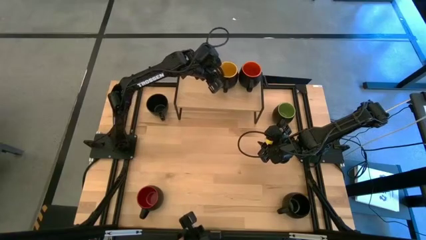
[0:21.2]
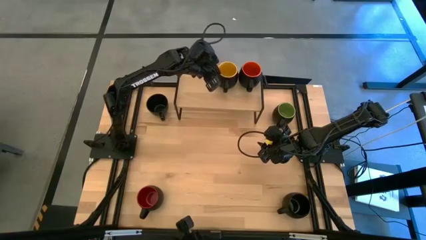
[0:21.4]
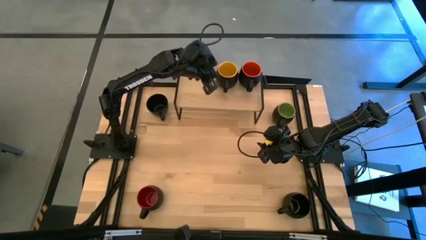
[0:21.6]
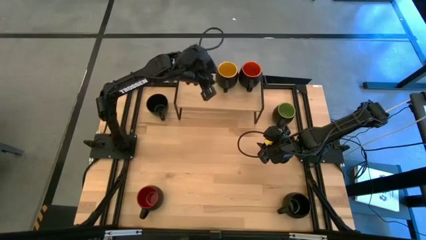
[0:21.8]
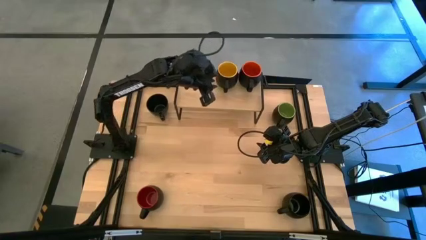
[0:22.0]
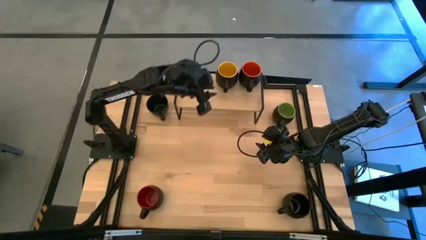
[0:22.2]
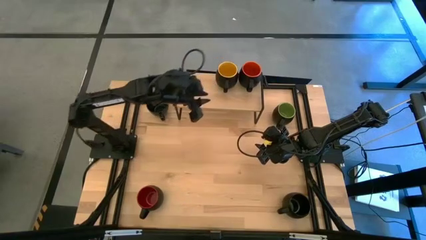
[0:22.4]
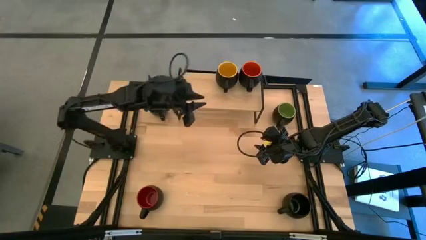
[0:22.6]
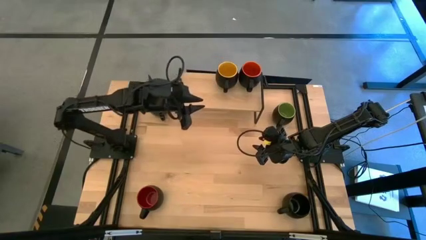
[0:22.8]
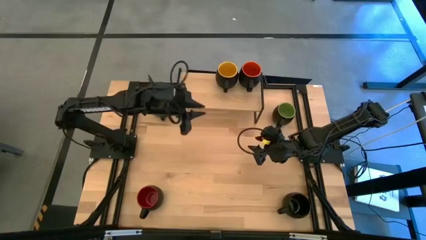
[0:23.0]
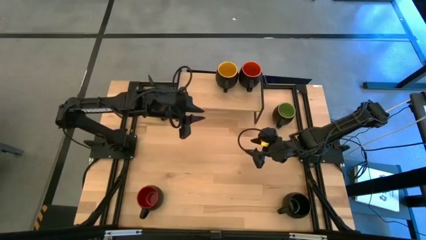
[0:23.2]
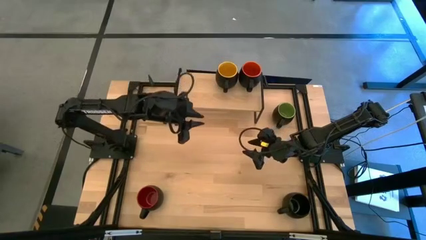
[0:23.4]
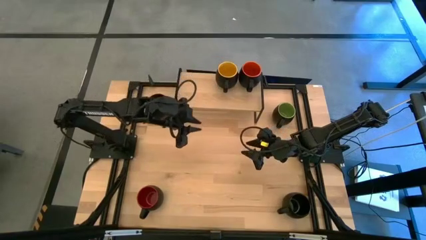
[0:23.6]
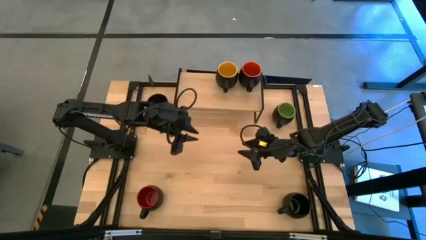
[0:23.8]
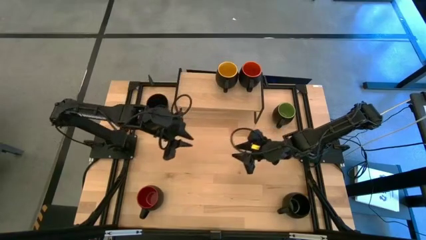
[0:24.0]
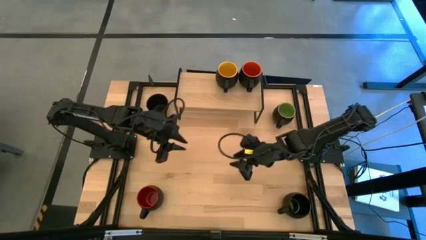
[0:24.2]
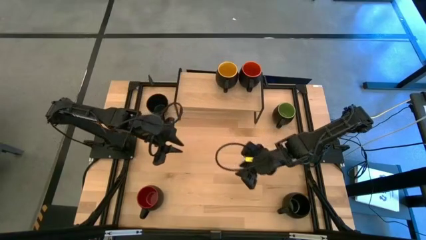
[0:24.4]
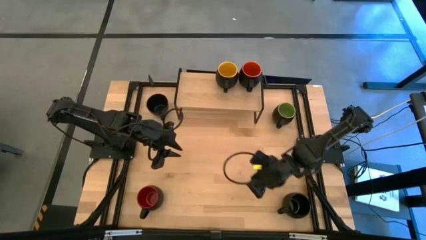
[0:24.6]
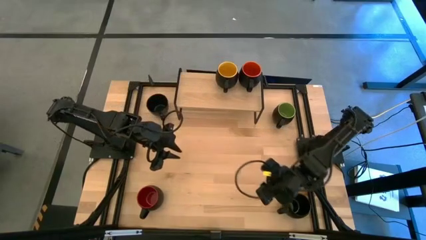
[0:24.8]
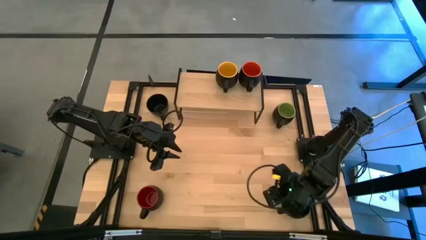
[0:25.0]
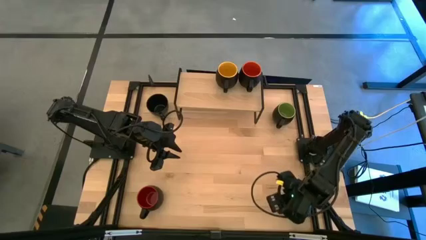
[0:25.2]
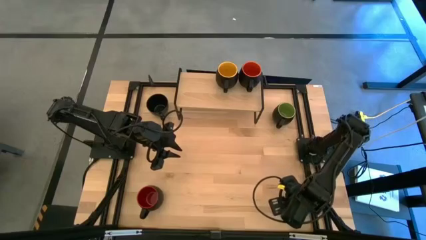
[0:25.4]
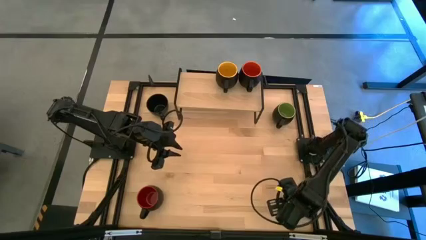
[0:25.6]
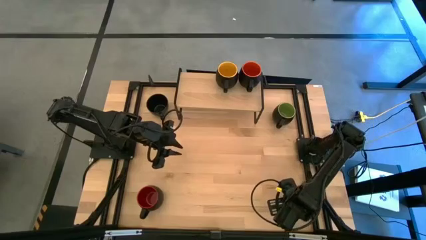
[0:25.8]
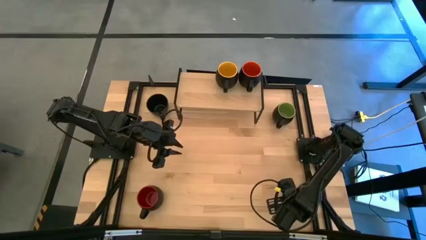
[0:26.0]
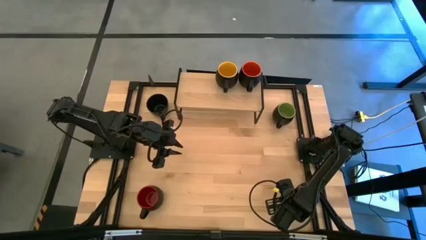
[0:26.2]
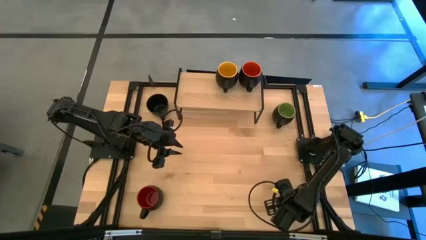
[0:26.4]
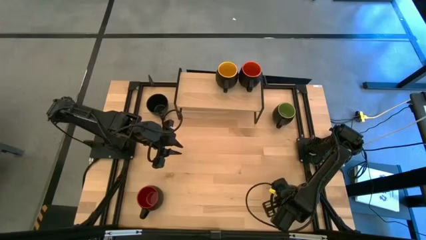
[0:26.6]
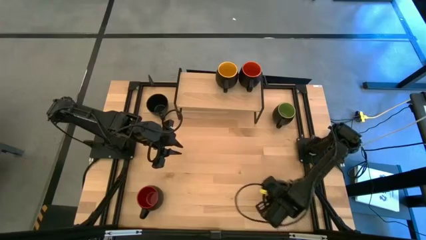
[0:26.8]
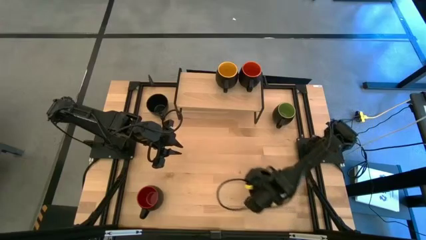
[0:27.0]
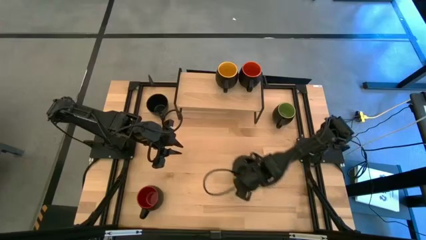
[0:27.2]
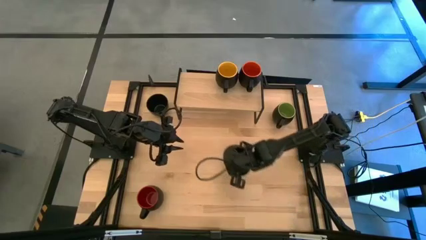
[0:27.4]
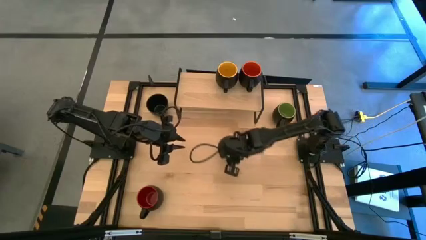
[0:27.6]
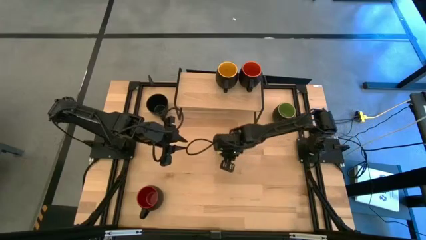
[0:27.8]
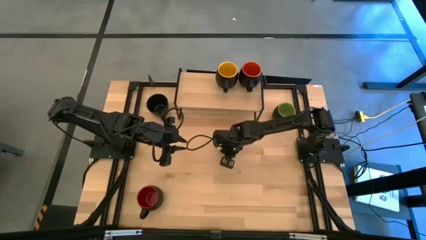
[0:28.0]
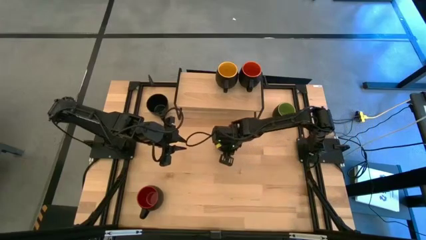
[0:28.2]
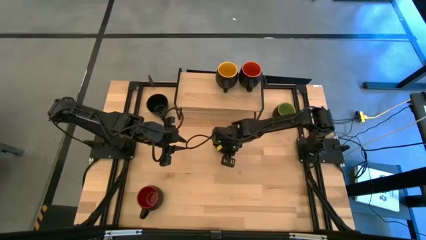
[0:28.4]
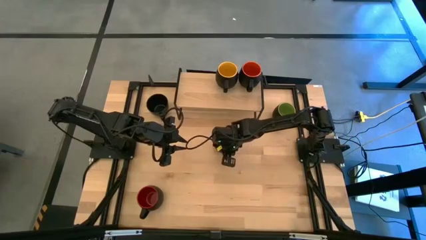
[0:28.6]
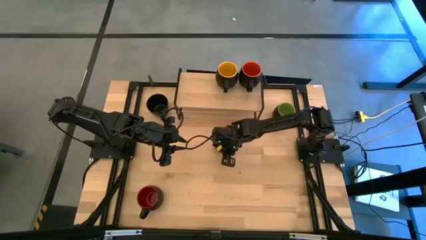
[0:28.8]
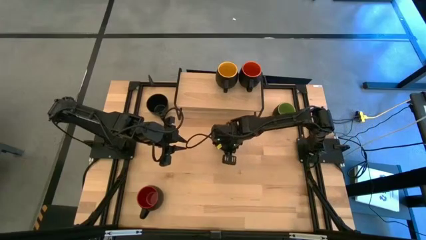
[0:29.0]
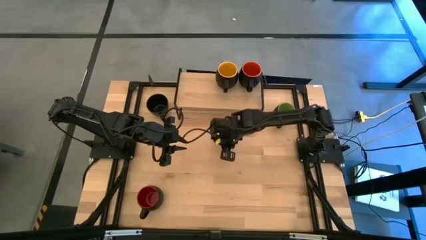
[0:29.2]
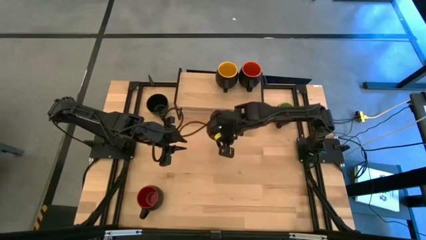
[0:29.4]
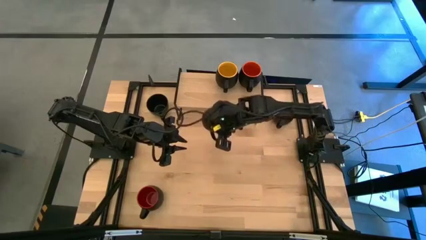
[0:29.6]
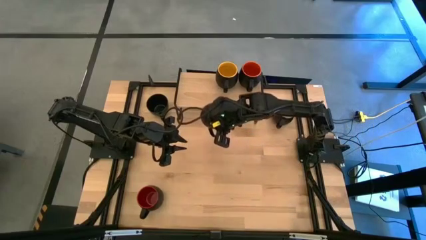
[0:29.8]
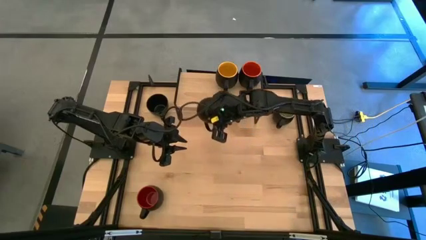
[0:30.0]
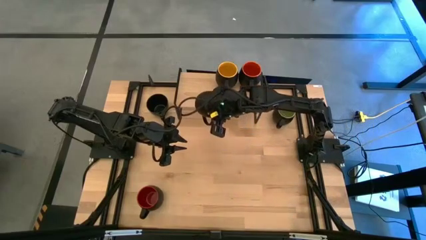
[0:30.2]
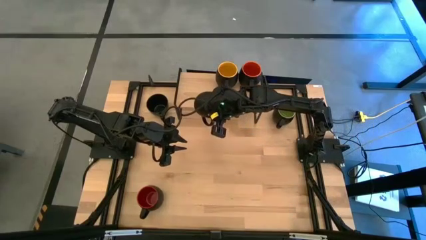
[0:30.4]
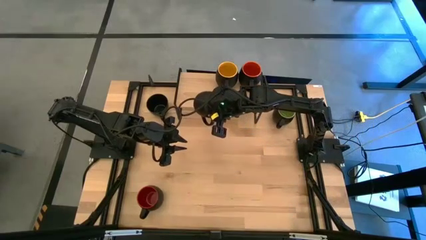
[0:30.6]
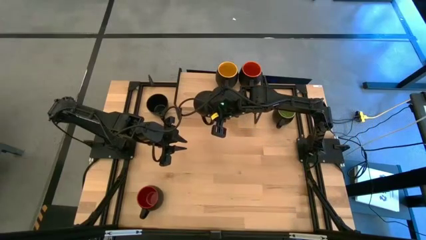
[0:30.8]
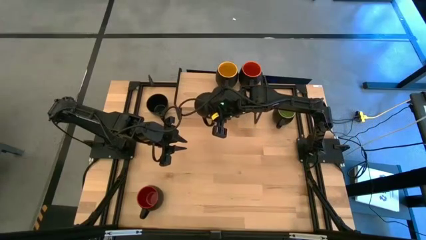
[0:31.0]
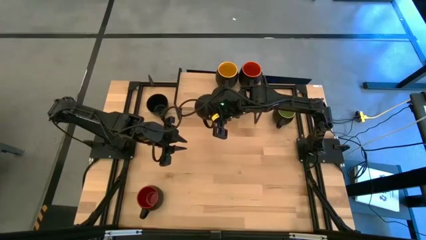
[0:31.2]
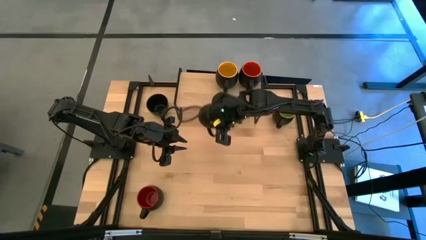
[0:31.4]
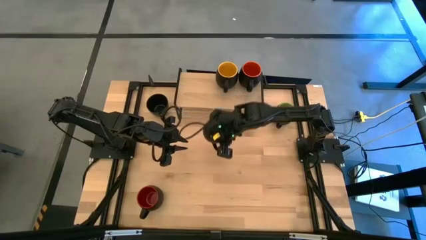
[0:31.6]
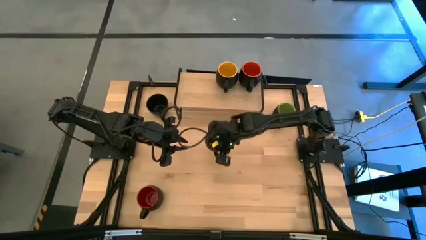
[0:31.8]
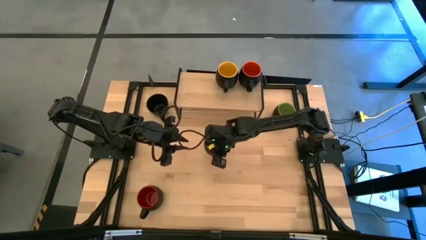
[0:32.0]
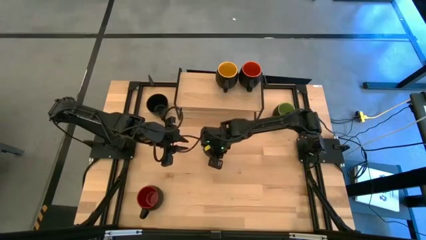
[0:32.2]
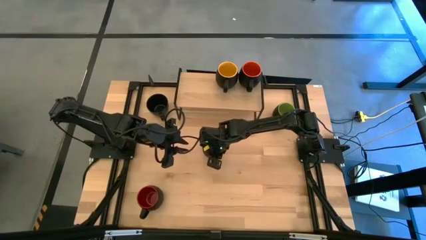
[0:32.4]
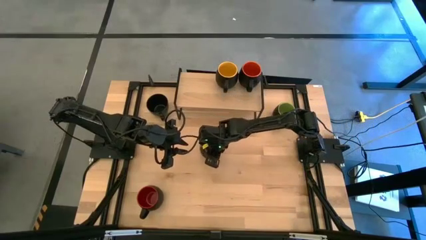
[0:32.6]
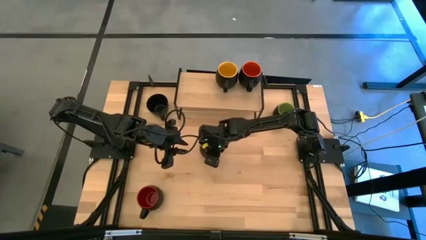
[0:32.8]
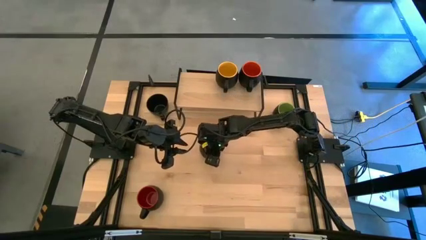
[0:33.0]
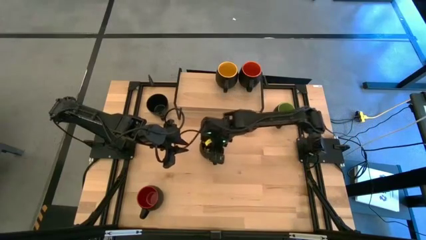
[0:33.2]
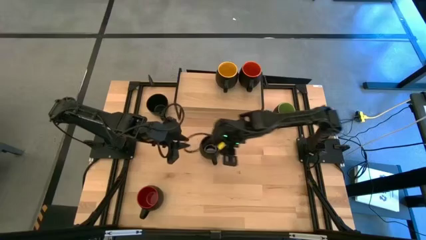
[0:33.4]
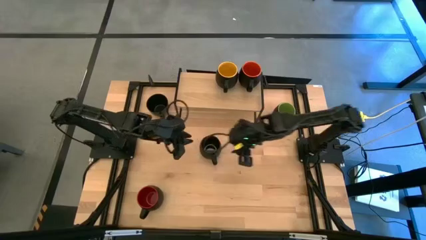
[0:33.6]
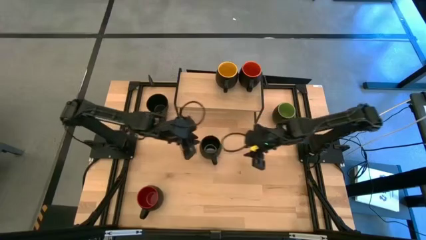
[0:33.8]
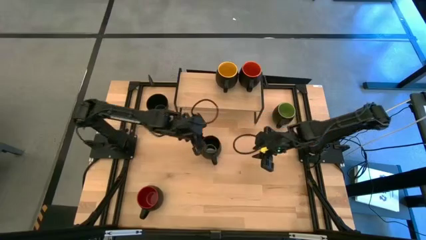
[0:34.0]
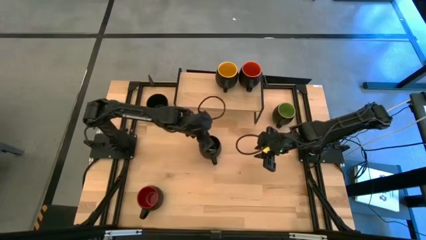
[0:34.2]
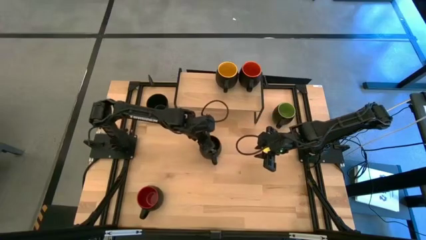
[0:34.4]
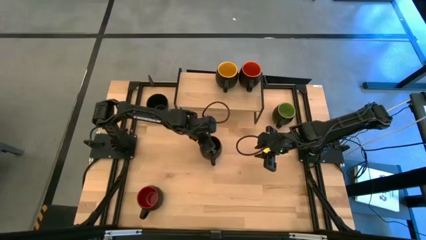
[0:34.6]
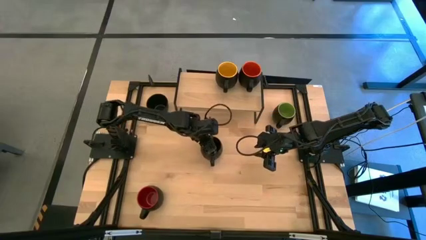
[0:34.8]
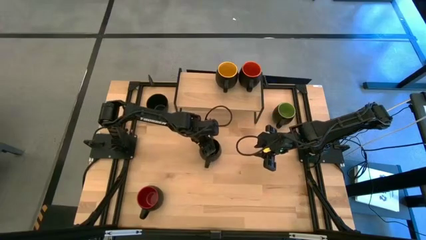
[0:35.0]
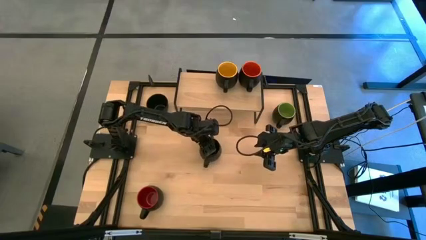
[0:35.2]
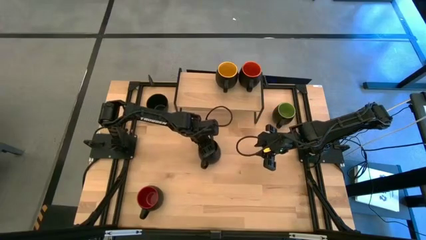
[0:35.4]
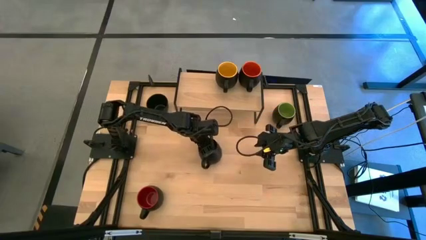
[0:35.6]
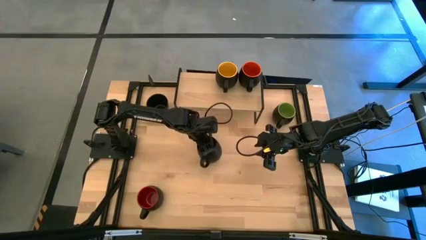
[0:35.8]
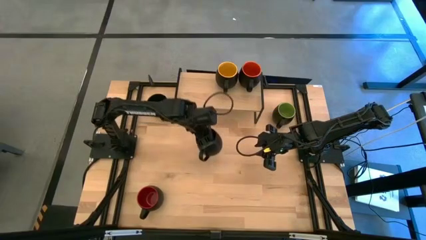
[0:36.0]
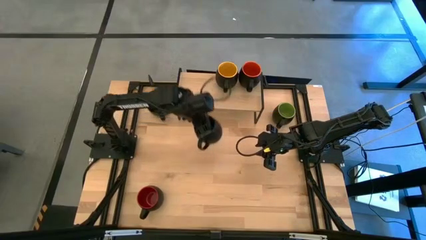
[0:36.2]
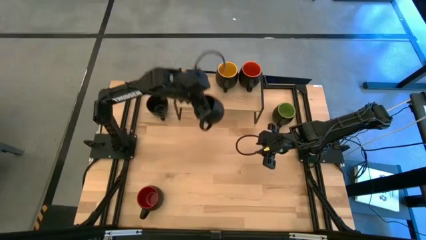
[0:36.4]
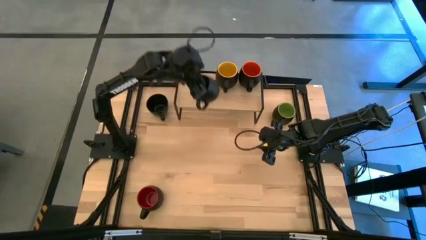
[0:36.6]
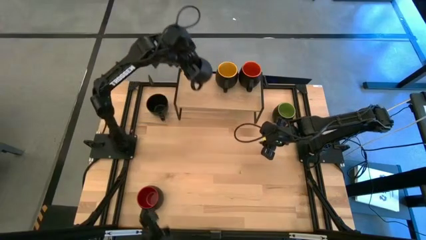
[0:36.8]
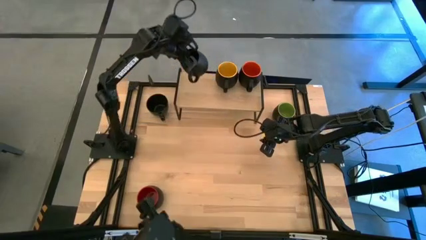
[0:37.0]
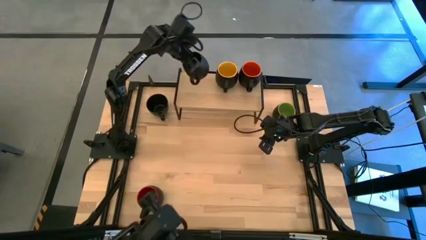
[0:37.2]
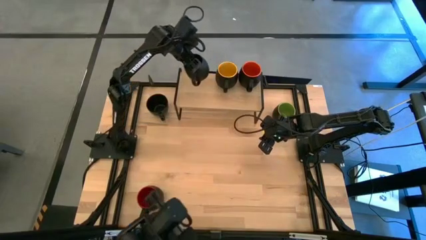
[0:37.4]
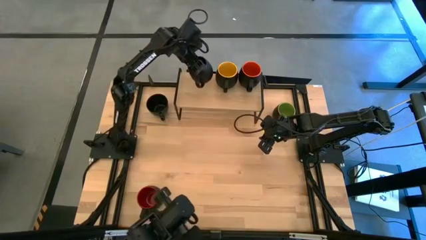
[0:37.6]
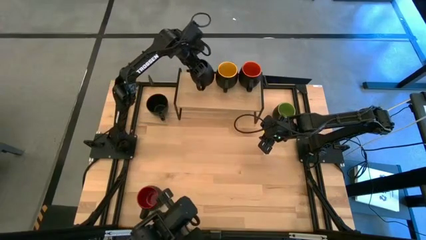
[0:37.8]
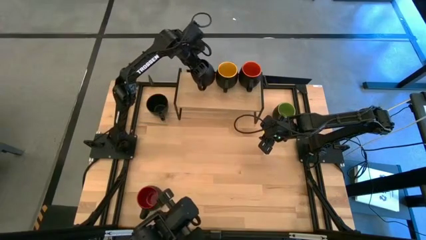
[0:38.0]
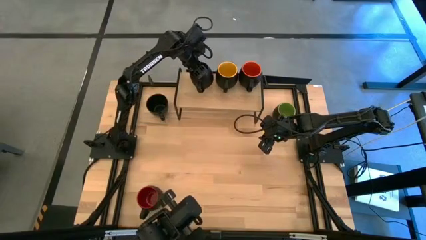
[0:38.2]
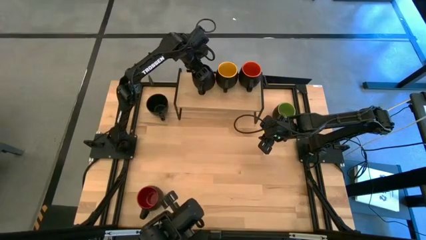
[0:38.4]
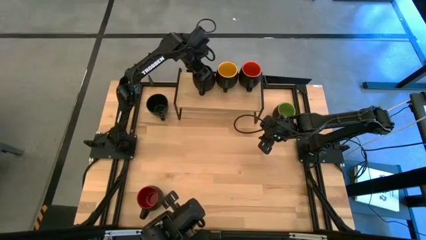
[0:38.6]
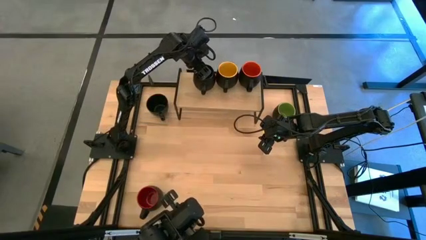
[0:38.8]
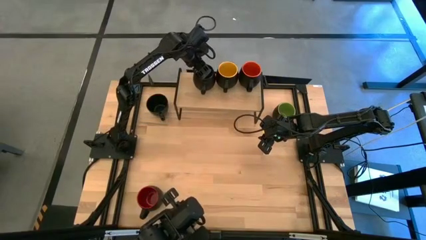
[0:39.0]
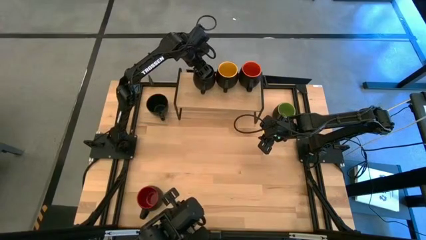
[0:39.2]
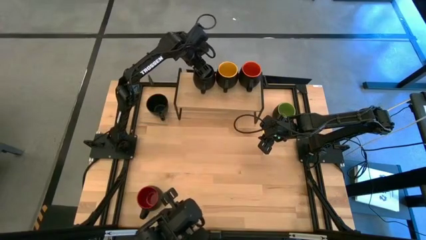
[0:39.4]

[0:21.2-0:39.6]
Task: Place coffee mugs
Put the bottom black cup on the shelf
